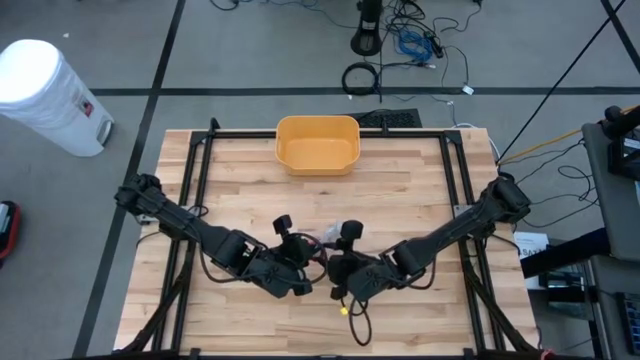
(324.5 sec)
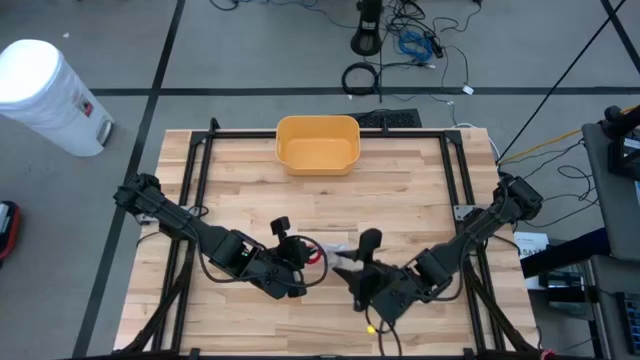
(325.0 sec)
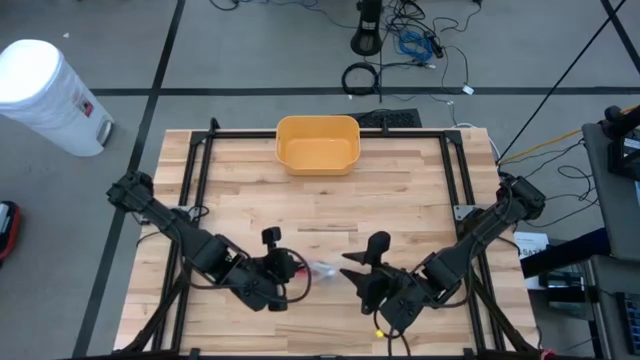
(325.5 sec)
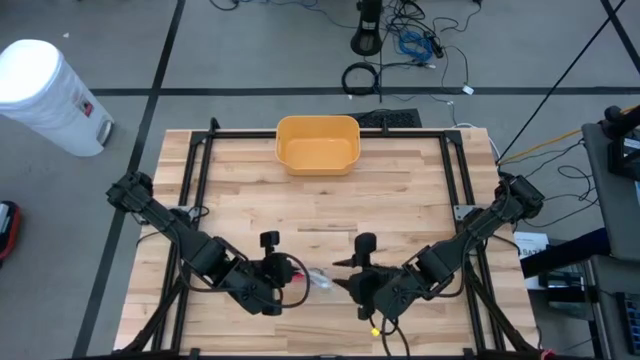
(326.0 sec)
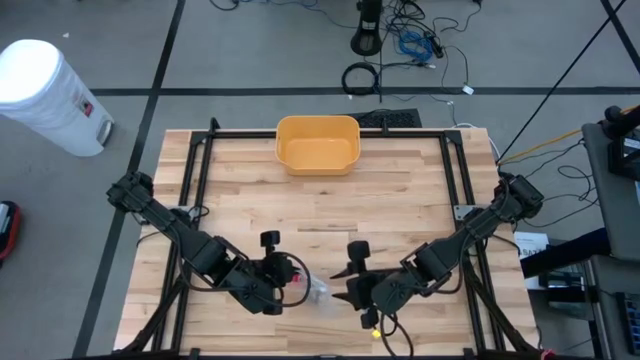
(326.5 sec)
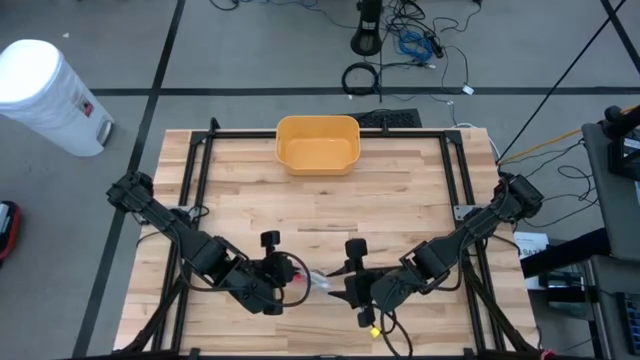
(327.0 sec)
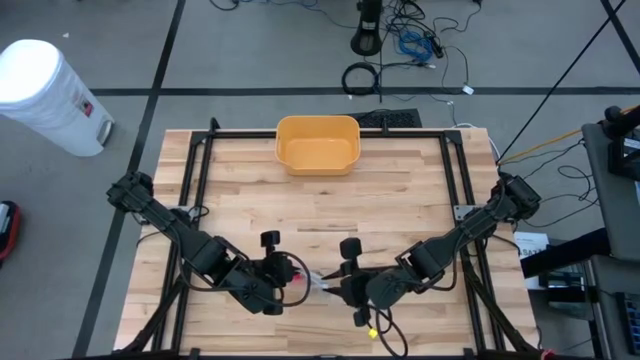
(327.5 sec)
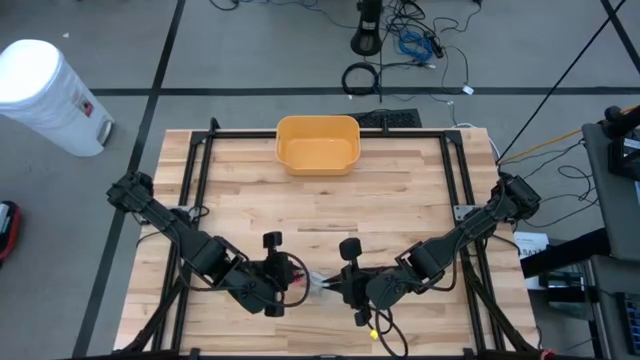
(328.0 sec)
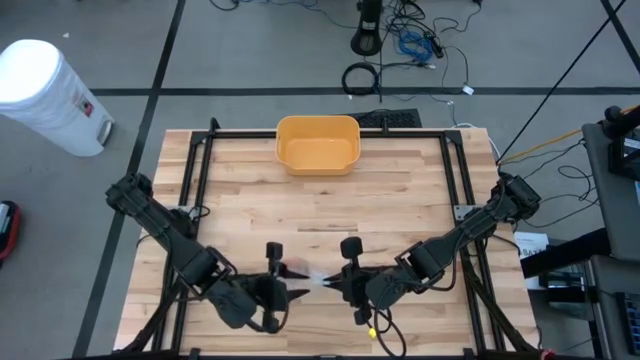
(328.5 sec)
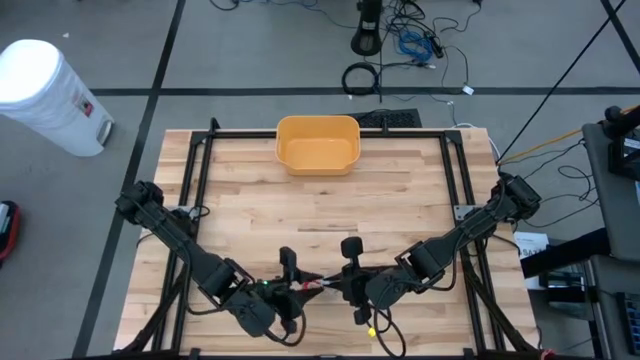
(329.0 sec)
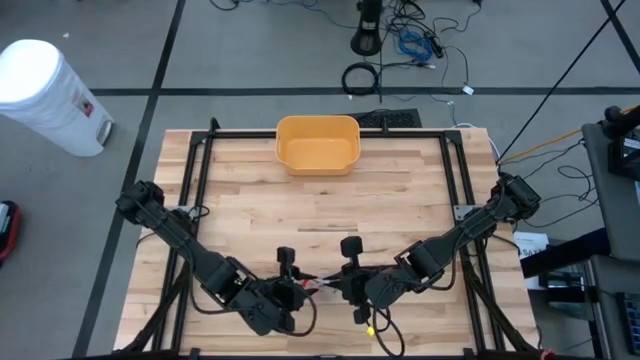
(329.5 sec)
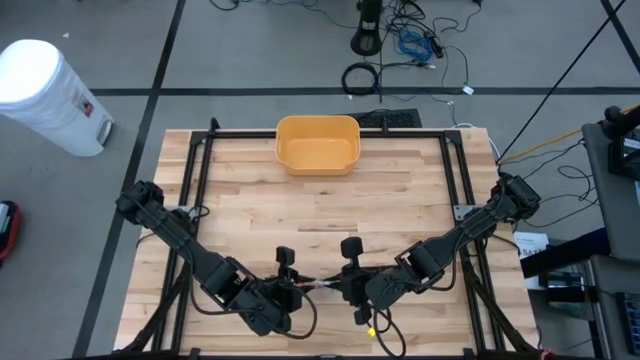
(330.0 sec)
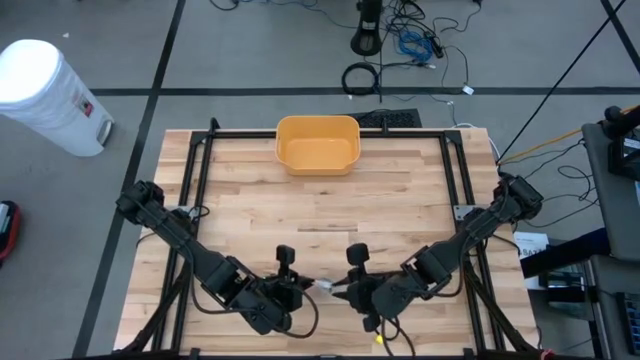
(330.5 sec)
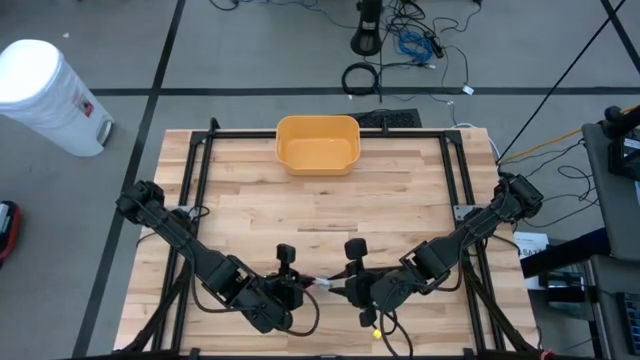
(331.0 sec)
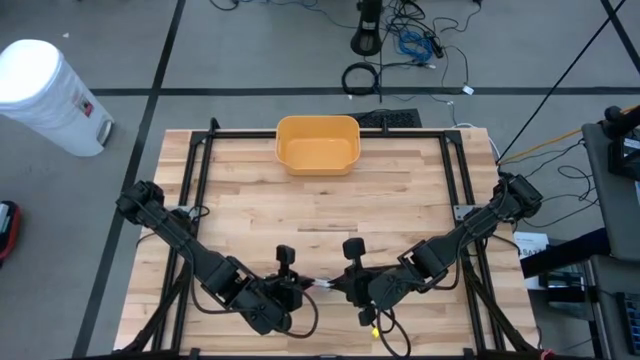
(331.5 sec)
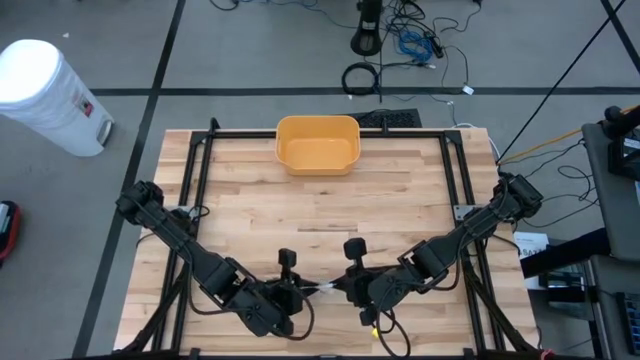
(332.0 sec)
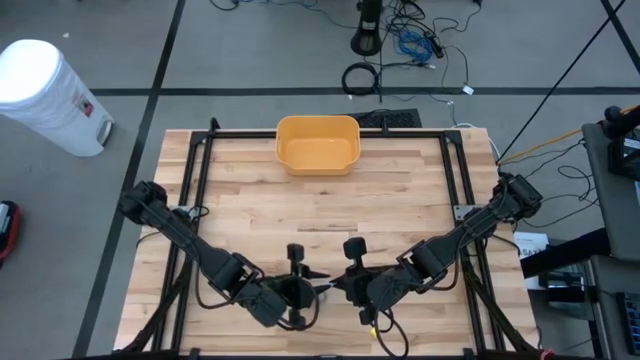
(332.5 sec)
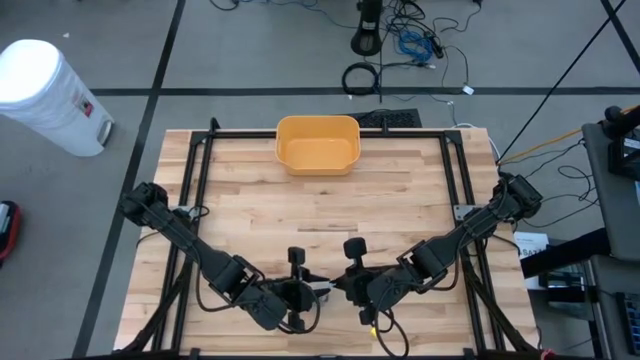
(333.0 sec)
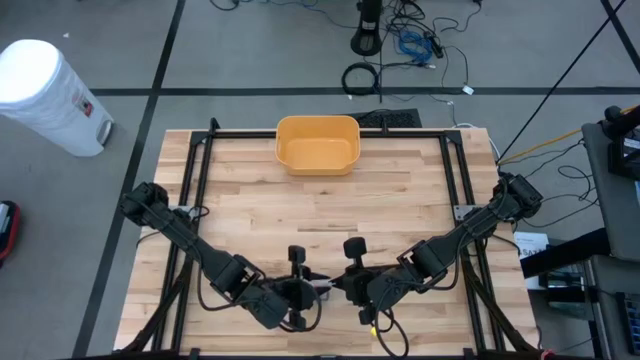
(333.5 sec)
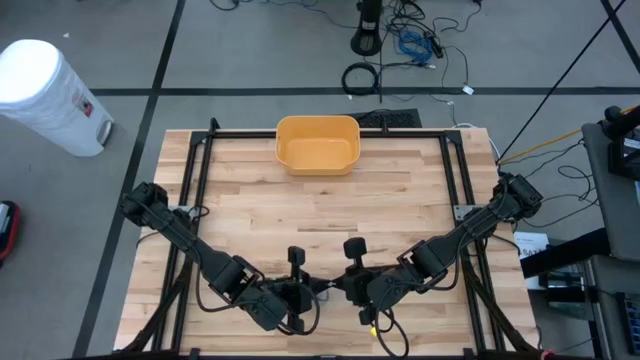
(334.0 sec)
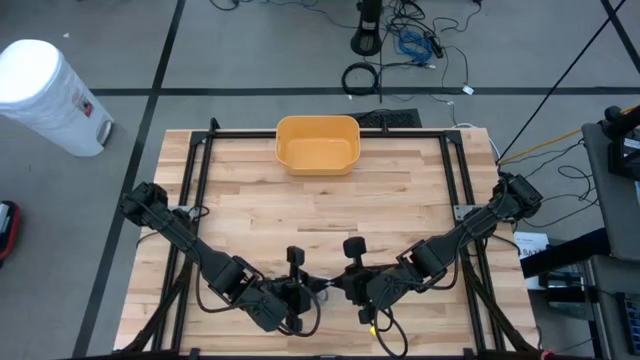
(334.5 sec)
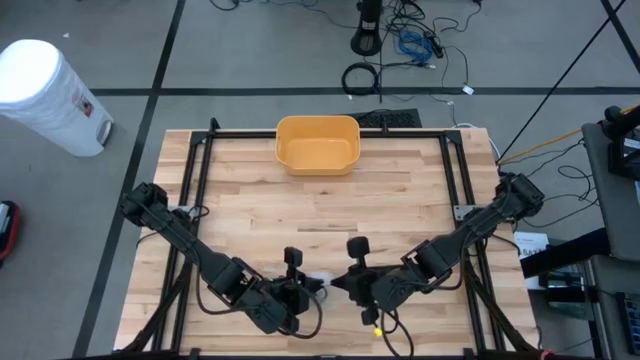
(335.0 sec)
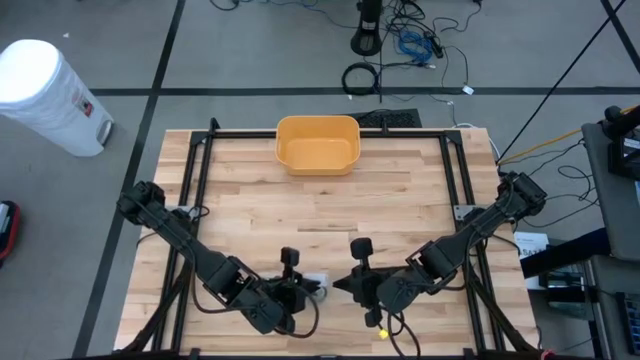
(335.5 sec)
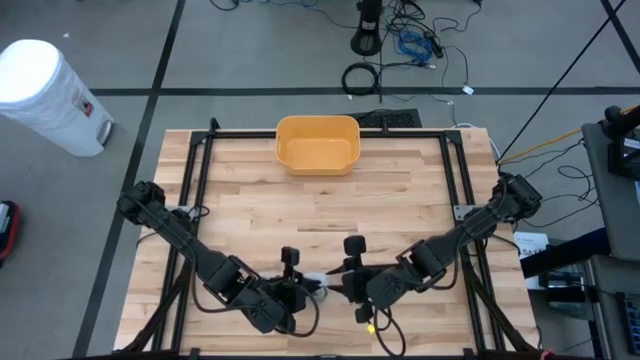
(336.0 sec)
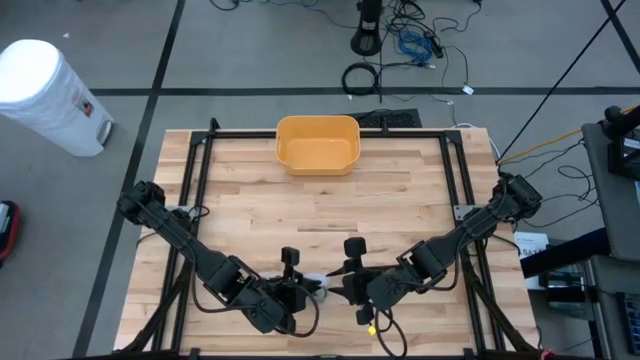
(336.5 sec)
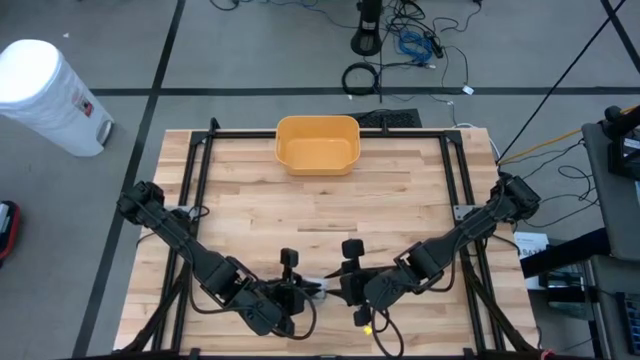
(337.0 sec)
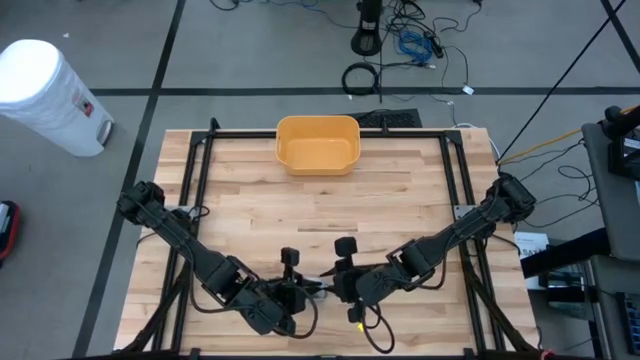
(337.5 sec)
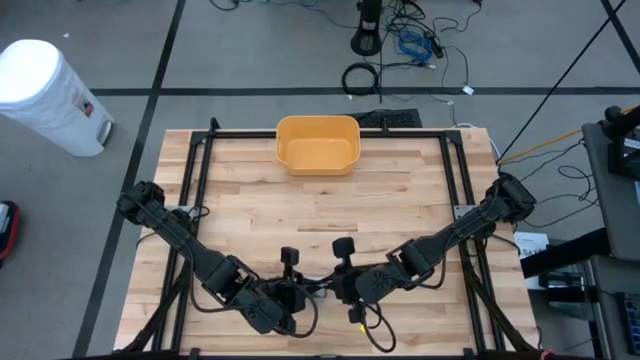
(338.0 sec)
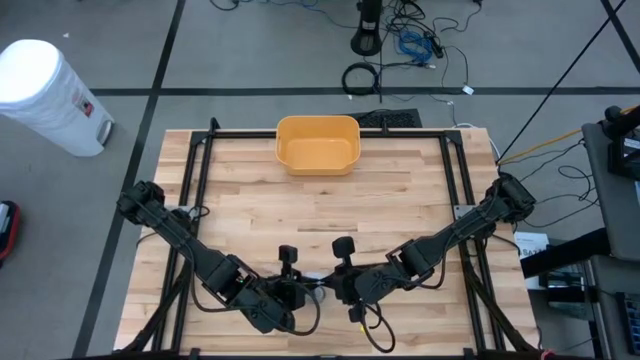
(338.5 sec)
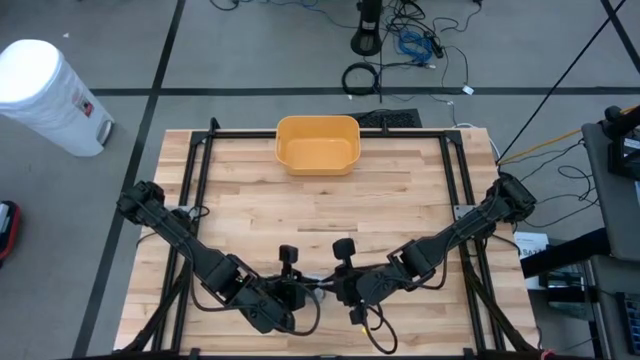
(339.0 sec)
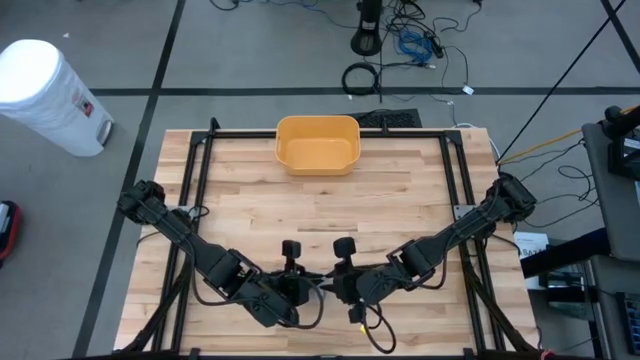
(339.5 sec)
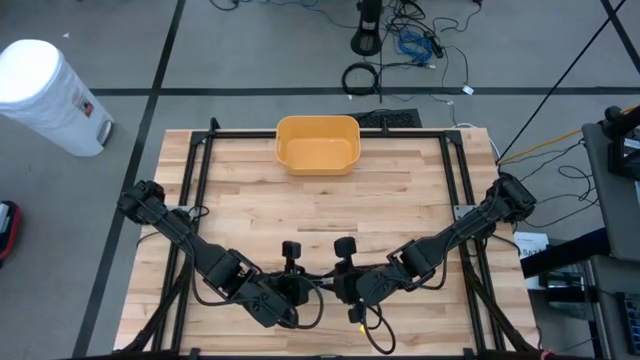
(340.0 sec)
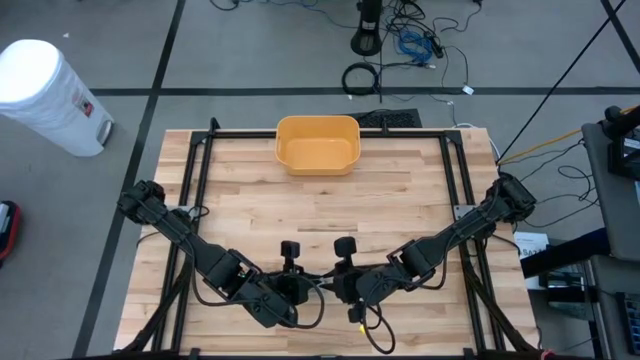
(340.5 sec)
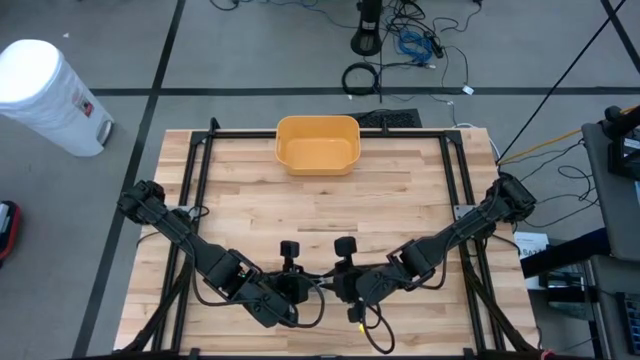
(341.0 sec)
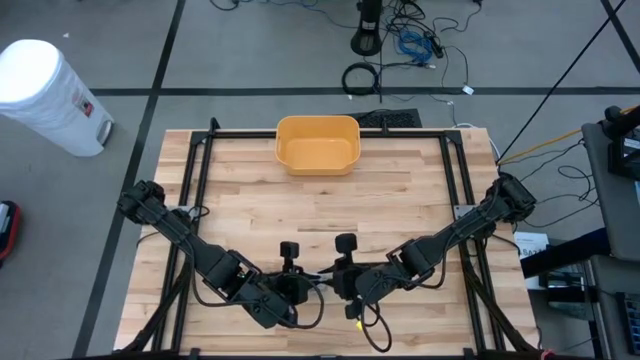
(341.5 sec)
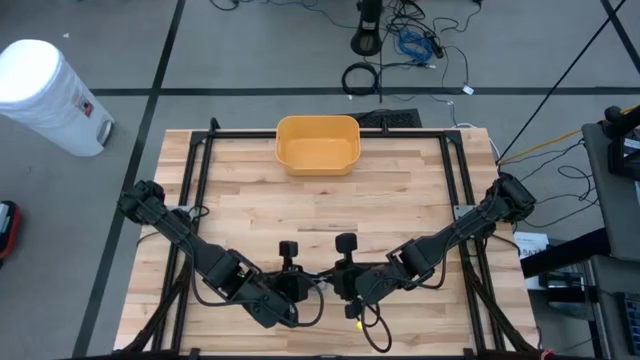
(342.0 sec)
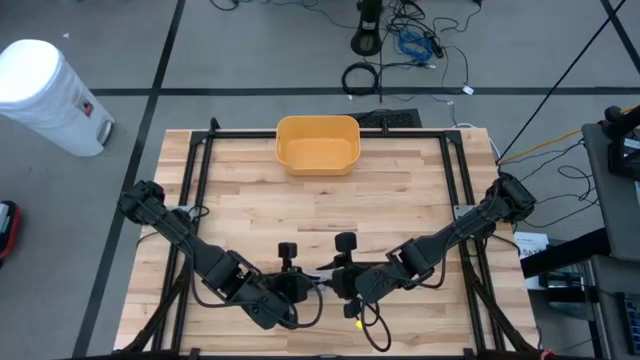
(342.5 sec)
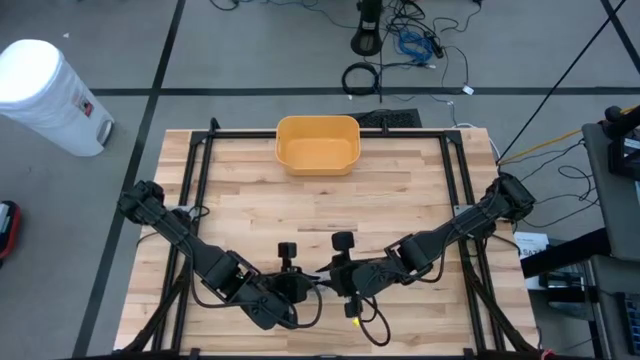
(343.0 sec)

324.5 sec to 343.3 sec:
Task: Roll bandage
Close the transparent zip bag

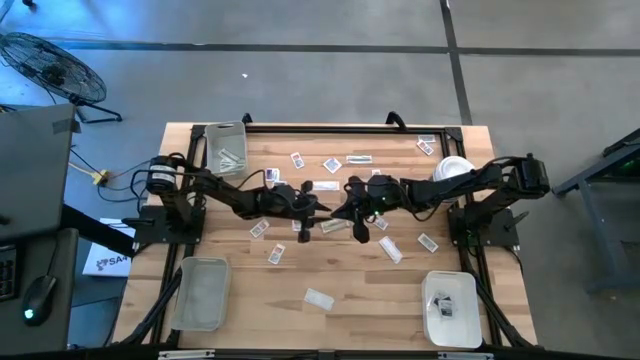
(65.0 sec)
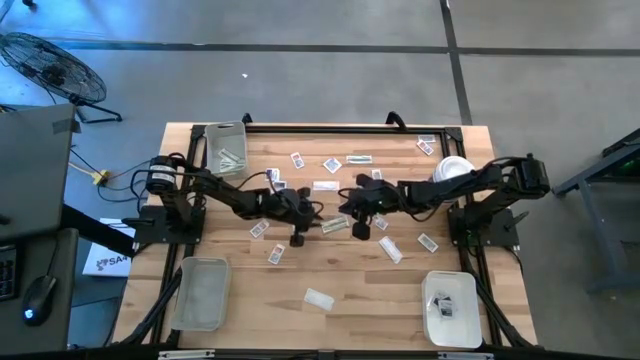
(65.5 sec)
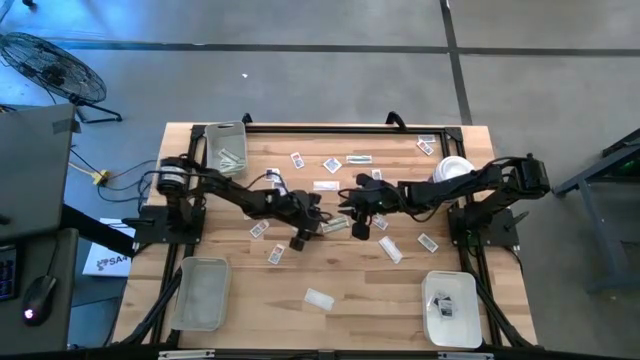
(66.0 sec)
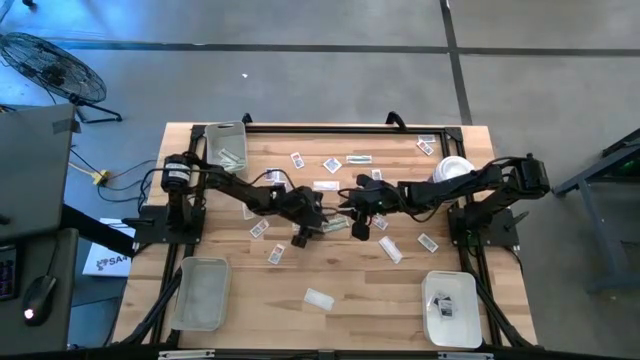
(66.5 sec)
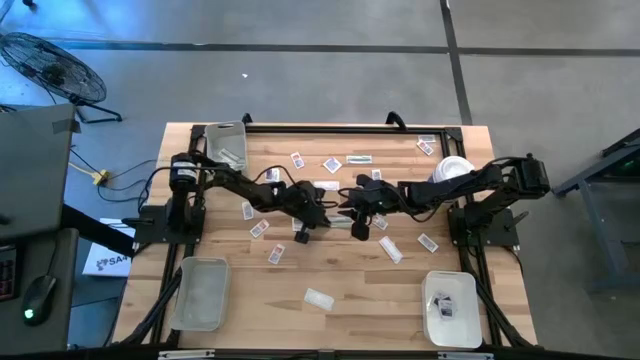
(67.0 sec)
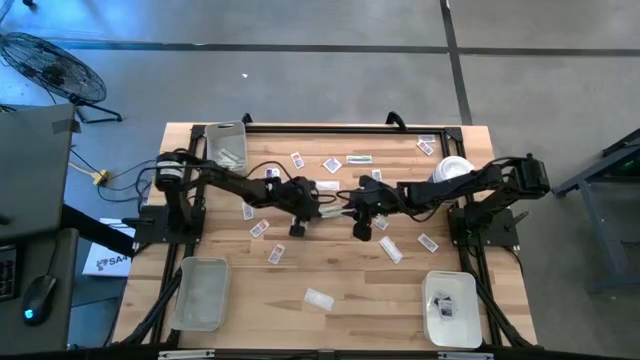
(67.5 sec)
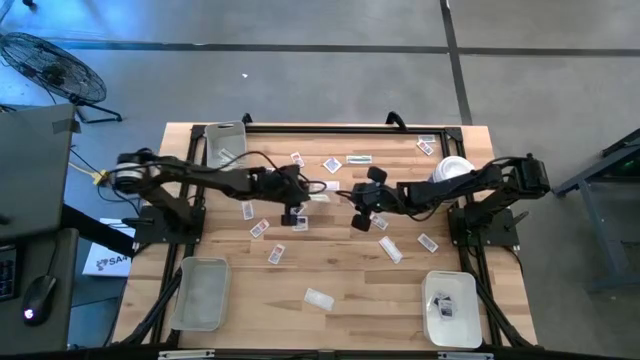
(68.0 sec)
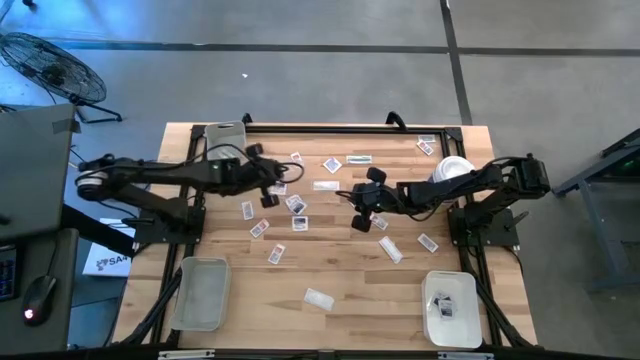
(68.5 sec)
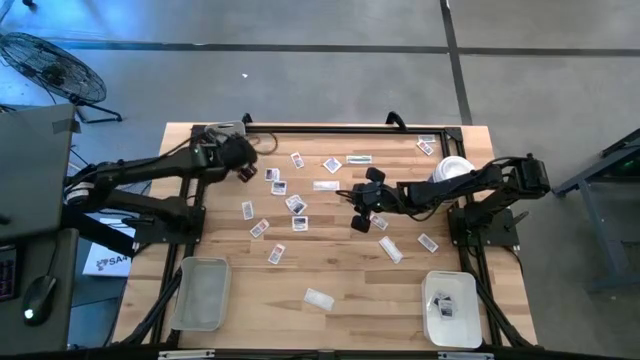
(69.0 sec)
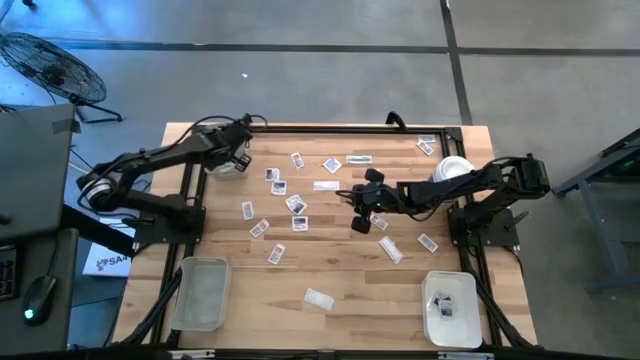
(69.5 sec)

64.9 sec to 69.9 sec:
Task: Pick & Place First Aid Supplies
Put the green bandage pack into the top gray bin
